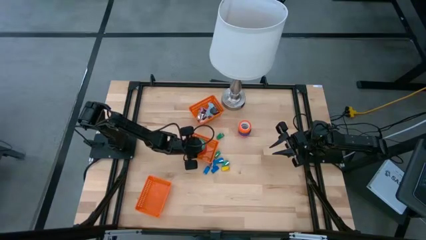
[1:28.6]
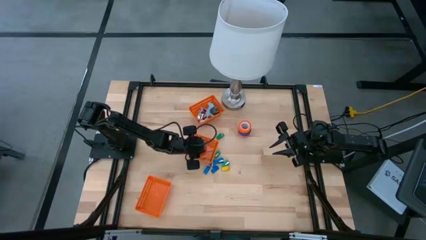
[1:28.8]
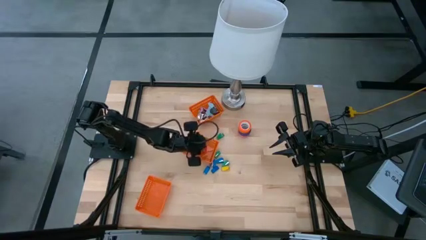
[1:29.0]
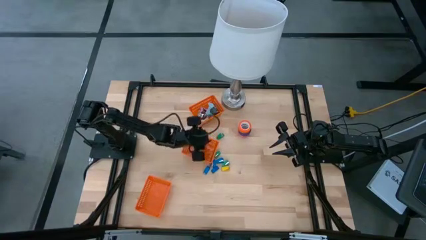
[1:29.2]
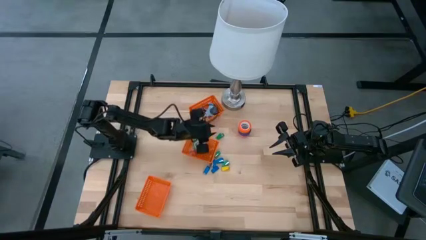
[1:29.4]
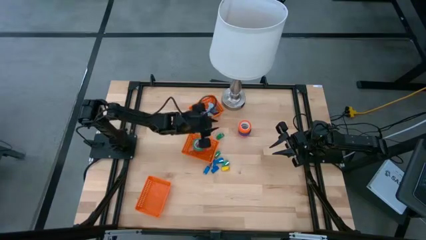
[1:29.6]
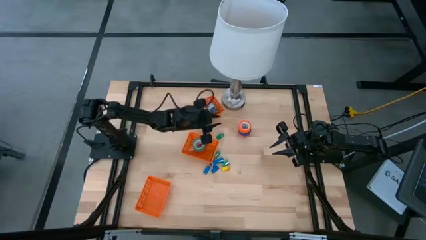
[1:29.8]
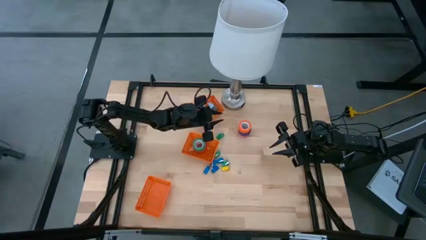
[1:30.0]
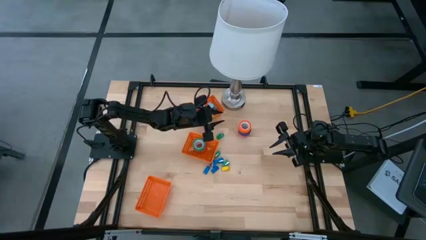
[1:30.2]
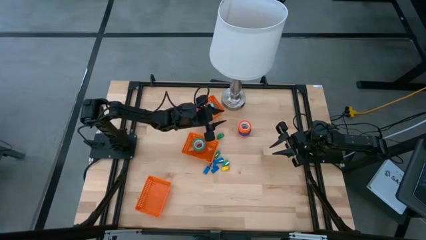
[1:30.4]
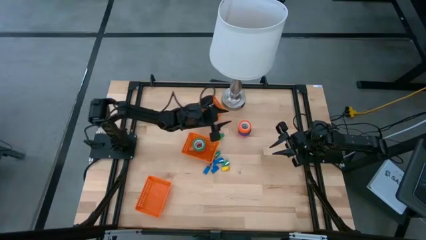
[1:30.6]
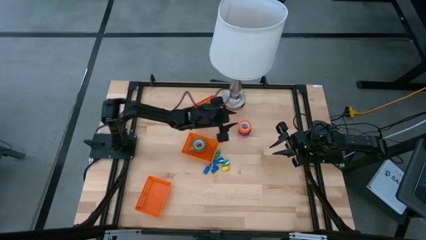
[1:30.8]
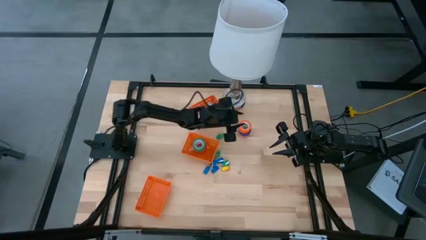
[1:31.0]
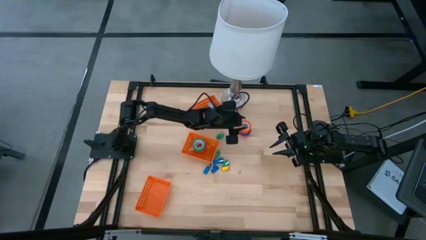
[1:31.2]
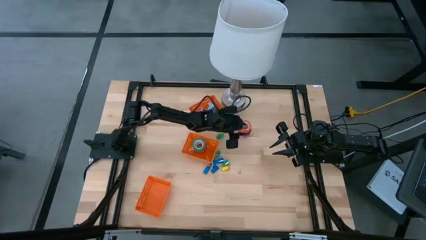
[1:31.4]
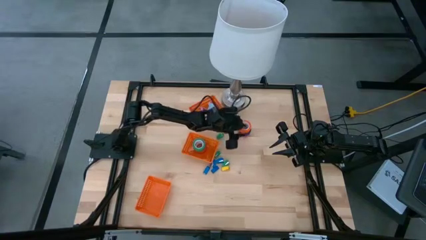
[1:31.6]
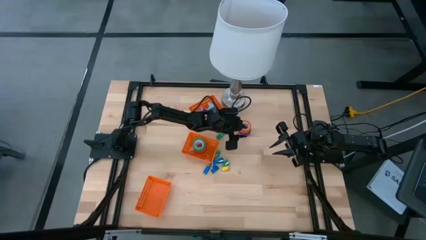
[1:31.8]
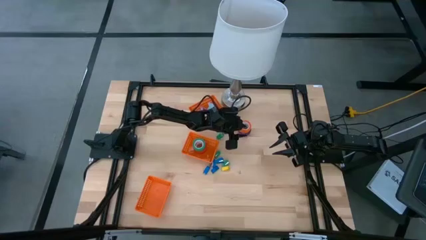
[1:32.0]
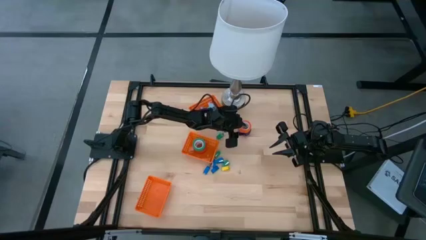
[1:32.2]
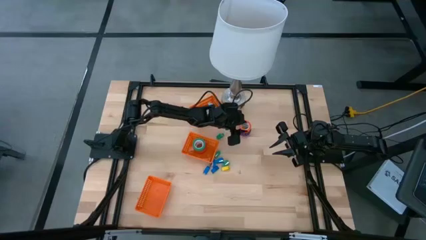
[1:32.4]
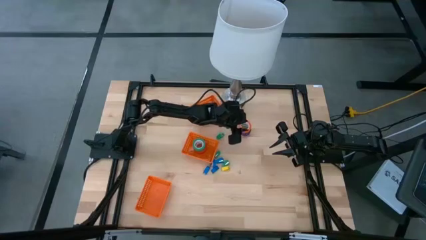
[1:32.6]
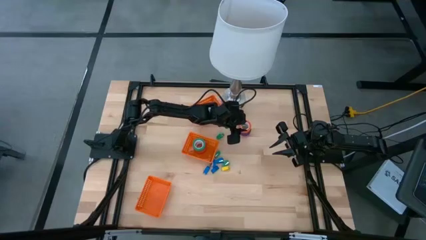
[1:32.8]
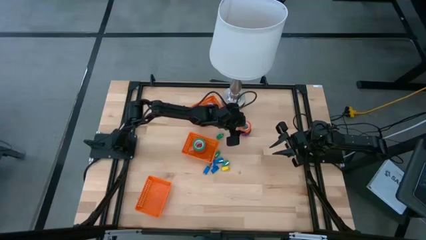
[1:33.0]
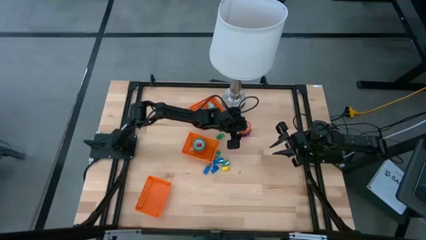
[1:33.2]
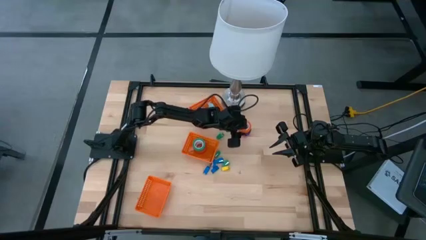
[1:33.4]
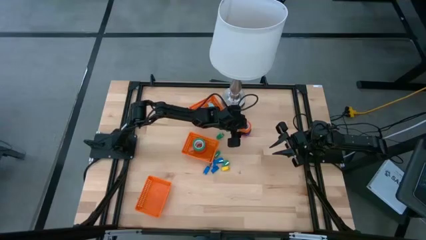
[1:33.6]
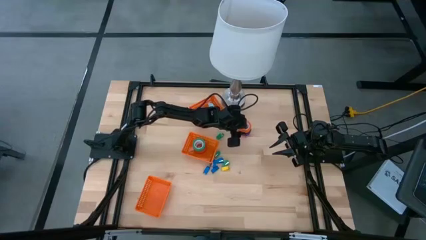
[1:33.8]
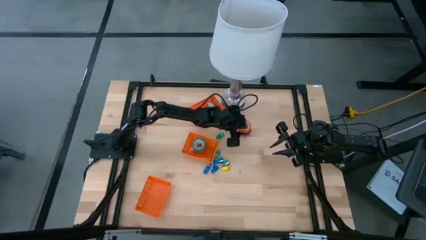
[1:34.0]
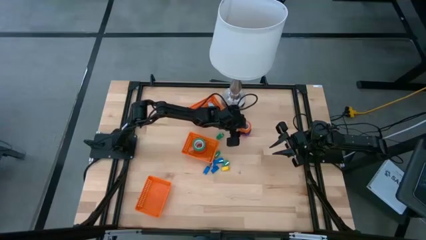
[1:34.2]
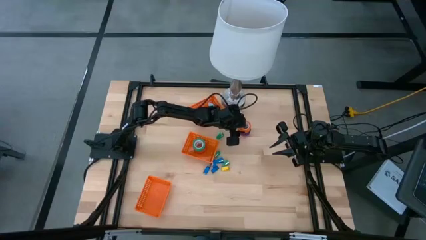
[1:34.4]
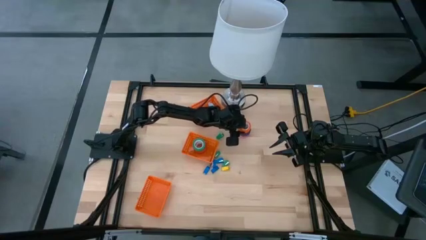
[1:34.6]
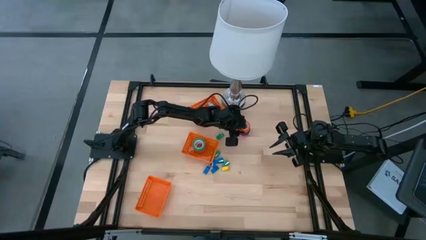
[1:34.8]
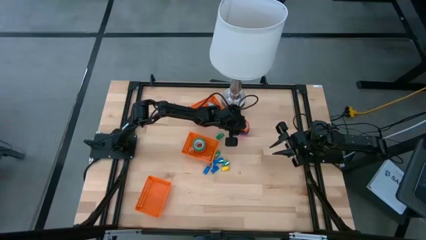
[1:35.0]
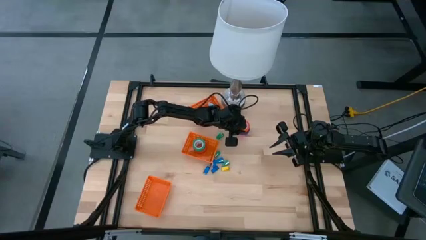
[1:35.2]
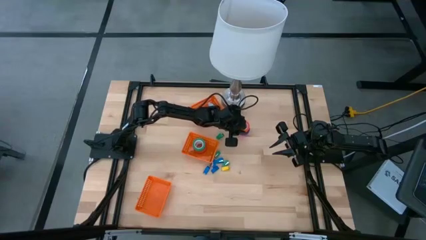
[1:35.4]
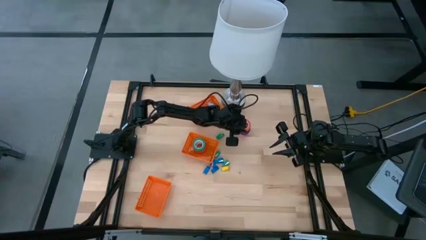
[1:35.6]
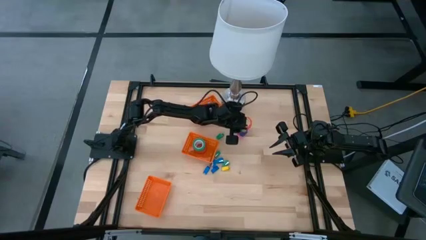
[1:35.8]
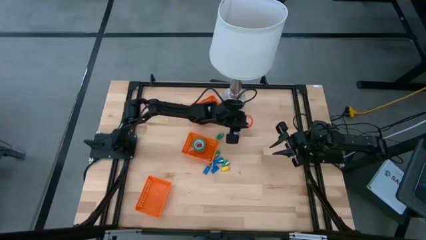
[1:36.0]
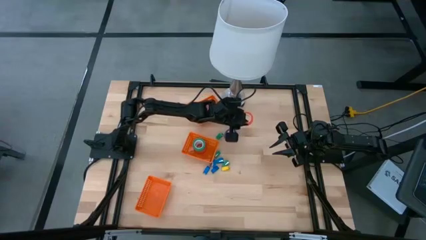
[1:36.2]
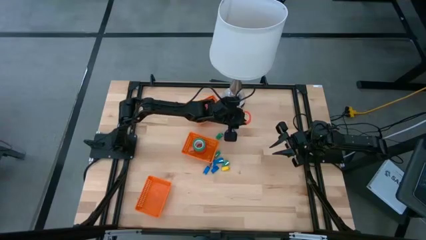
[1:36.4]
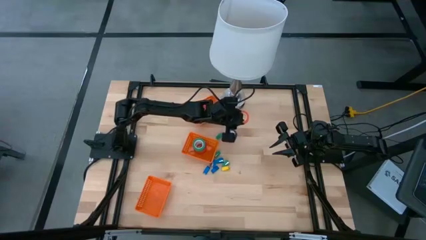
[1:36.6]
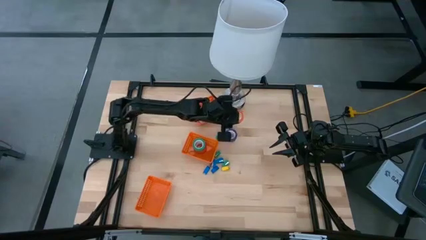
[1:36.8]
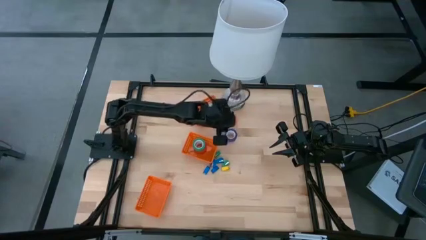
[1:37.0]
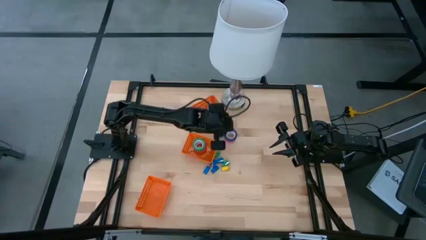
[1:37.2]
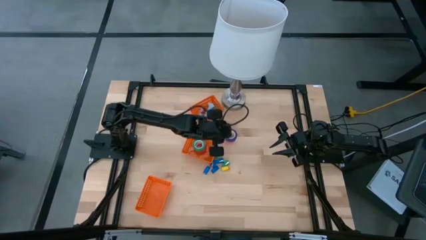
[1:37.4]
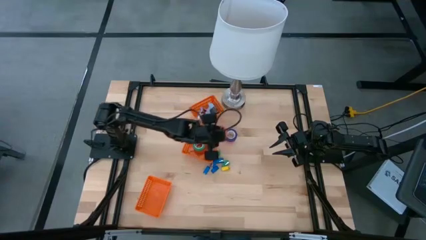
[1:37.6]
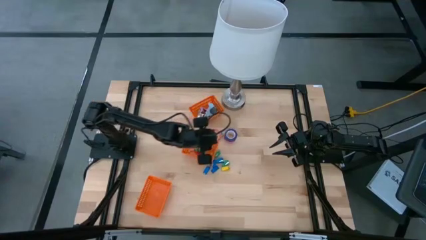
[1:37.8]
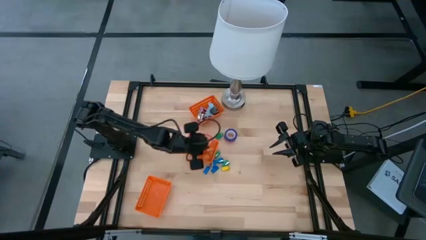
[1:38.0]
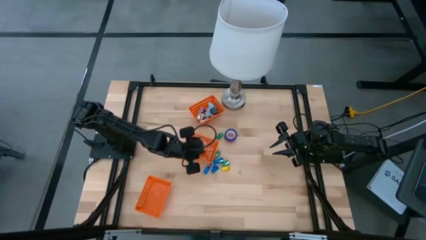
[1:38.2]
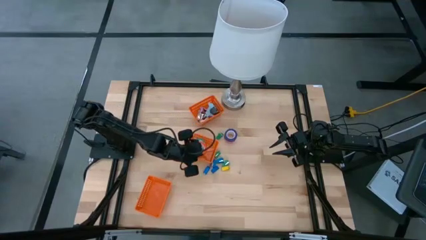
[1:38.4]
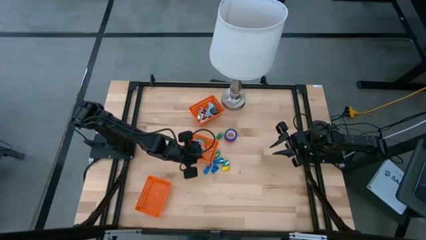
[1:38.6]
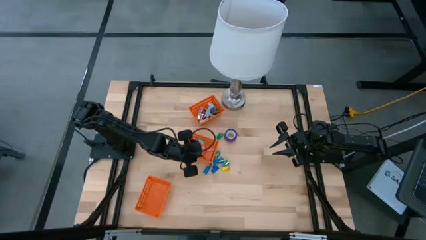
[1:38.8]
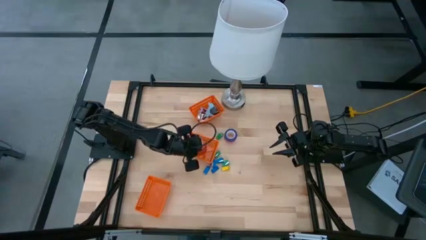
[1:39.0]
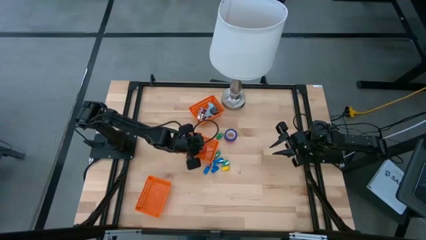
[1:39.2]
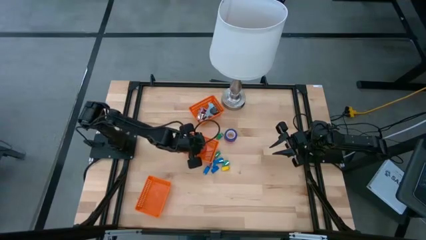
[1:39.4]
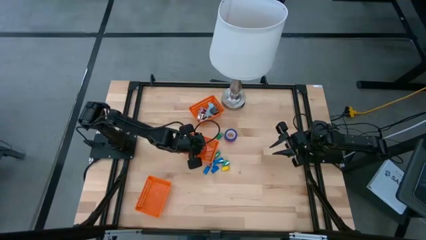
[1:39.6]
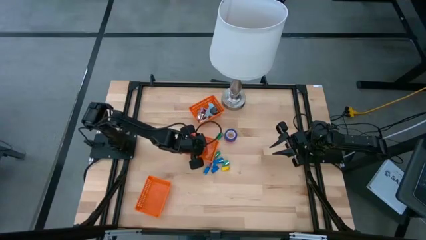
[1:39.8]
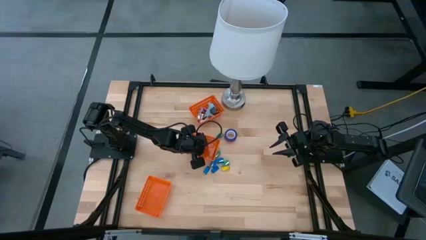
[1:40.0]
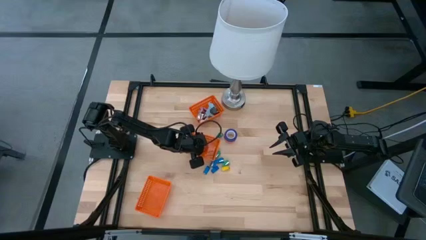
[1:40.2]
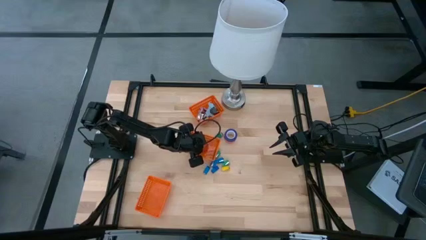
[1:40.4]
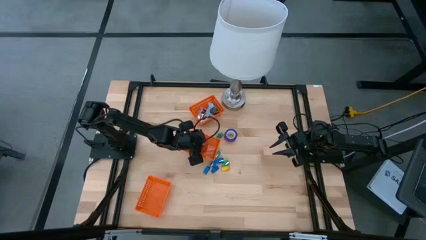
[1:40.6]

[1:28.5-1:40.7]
Task: Pick and place Stapler, Stapler remover, tape
Put the orange tape into the middle orange bin

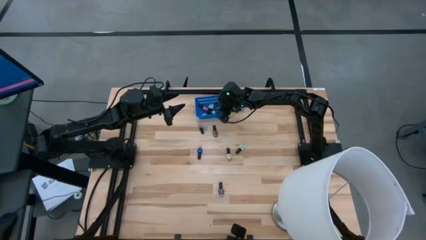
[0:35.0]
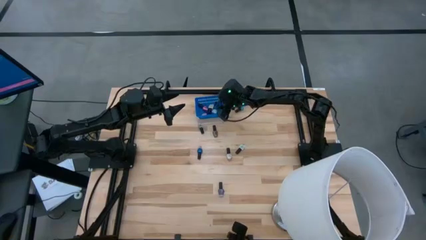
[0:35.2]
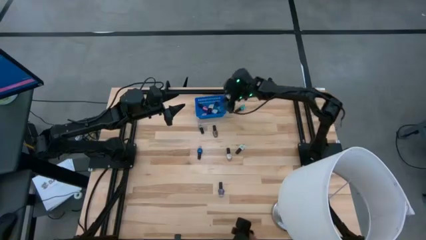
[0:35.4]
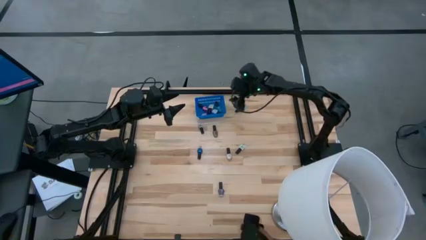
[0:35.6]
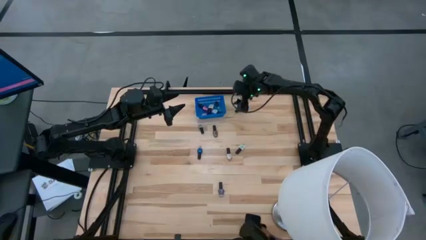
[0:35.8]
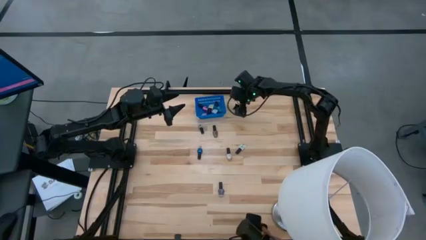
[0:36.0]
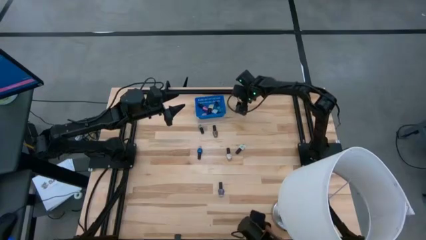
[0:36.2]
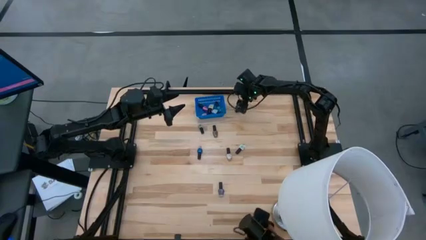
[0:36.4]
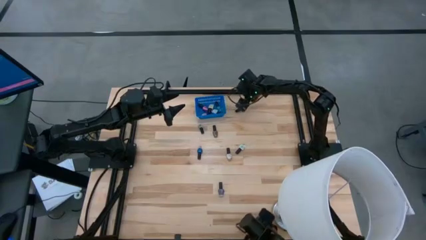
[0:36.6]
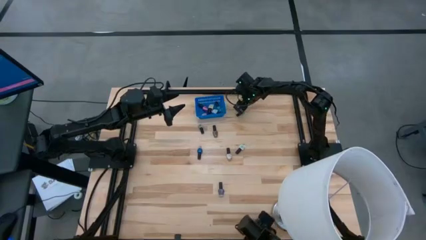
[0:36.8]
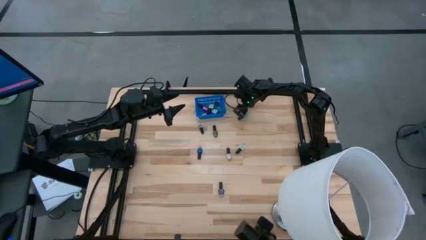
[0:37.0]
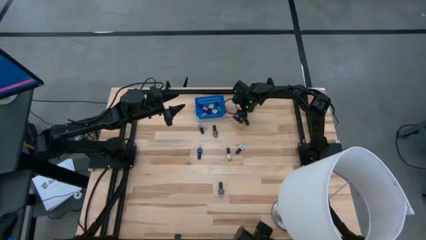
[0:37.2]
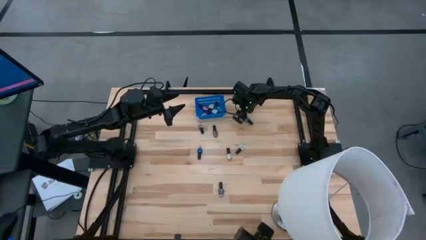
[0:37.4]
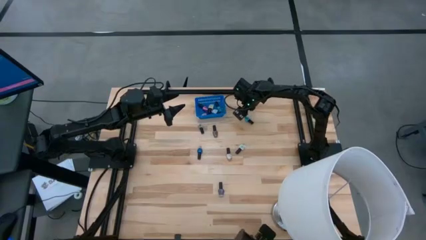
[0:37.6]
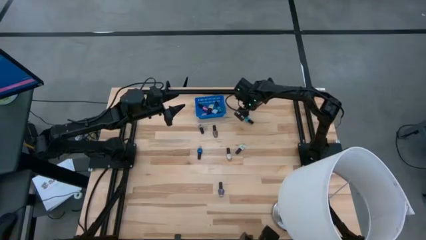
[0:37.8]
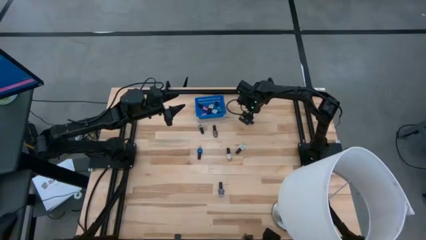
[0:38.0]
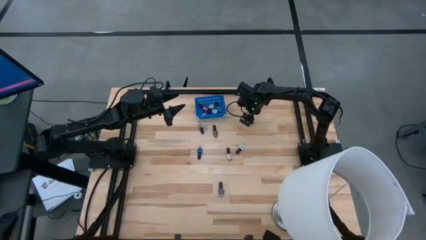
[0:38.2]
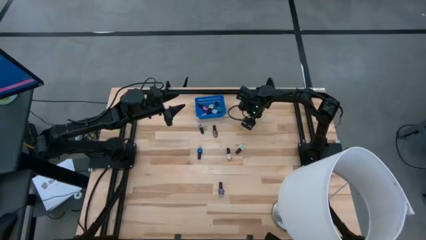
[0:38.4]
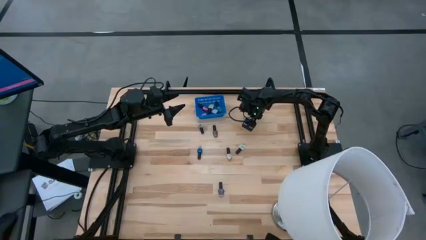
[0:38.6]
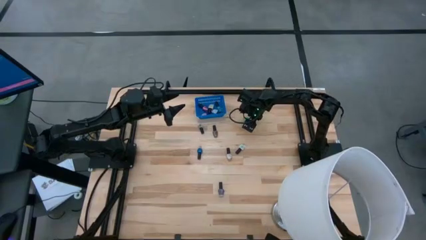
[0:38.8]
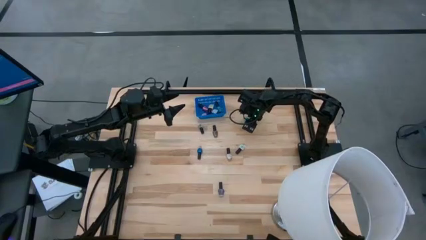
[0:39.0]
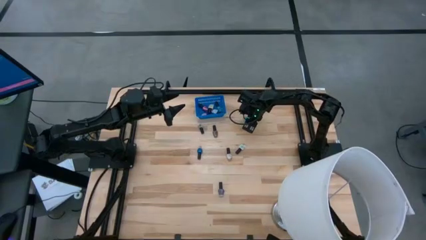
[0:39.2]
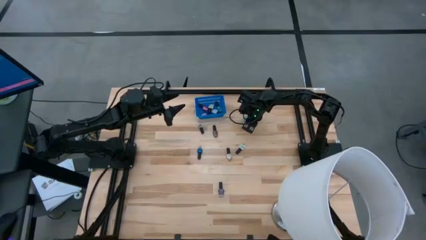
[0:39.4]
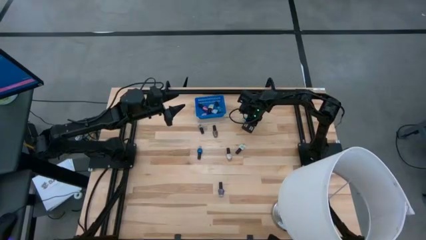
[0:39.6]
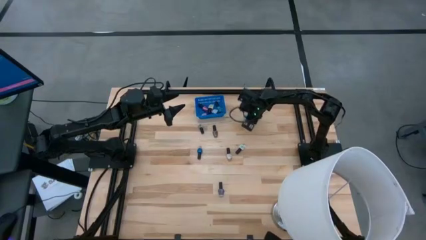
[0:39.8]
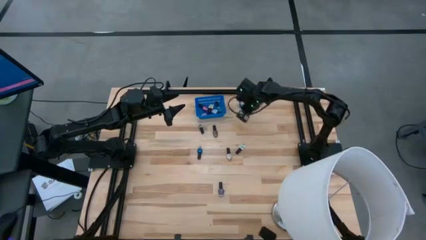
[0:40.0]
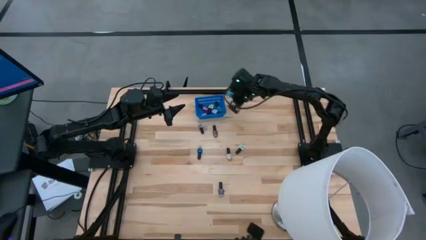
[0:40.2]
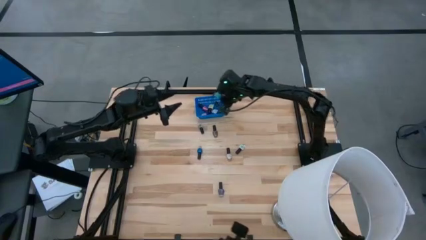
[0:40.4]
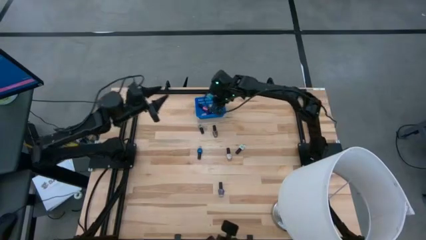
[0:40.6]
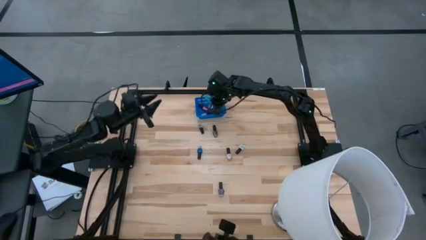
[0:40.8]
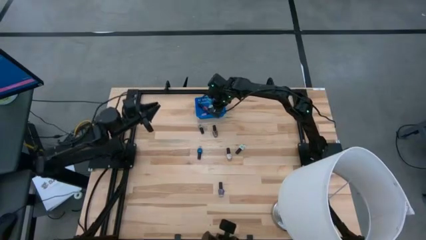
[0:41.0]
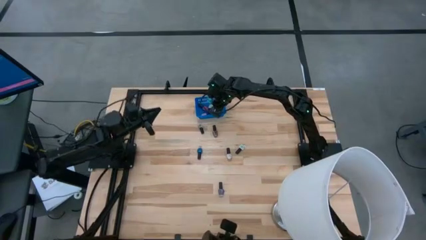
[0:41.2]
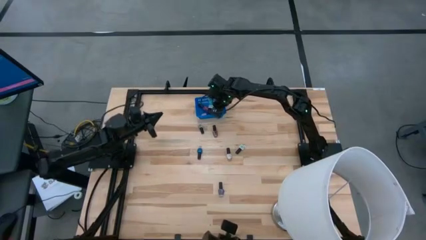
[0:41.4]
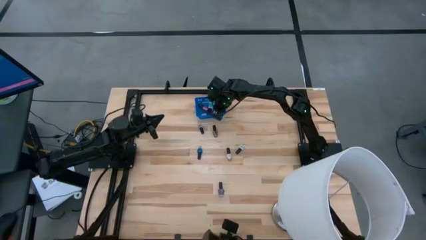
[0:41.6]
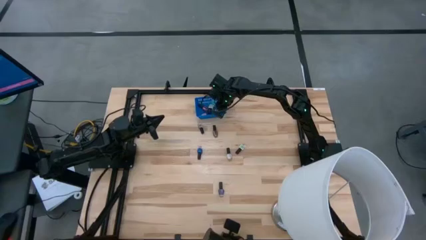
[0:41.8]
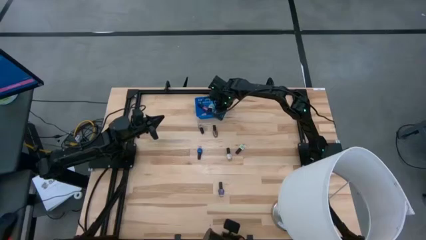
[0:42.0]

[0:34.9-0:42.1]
Task: Pick & Place Nail Polish
Put the light blue nail polish bottle into the blue basket
